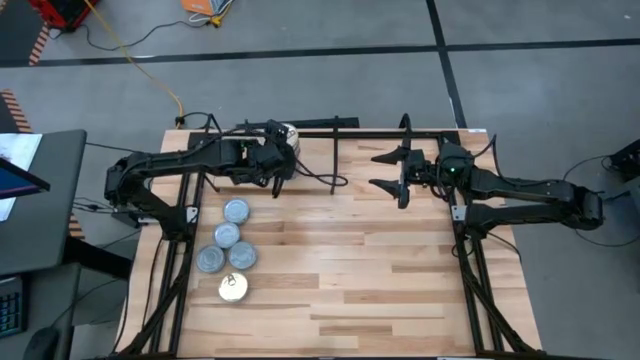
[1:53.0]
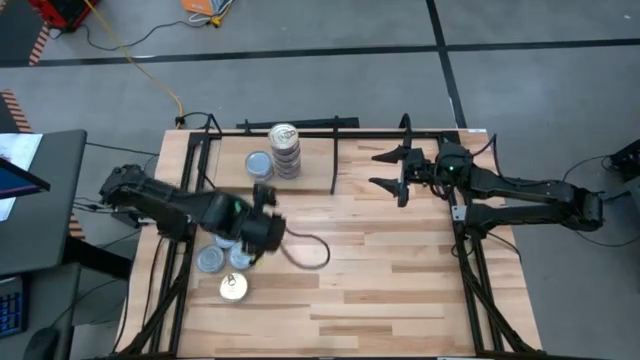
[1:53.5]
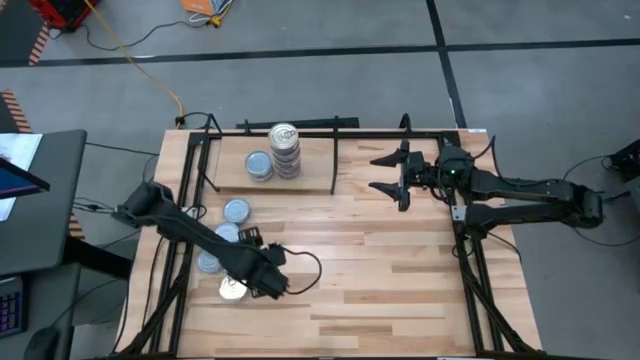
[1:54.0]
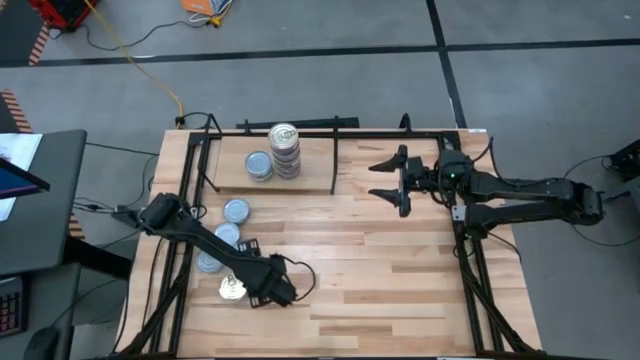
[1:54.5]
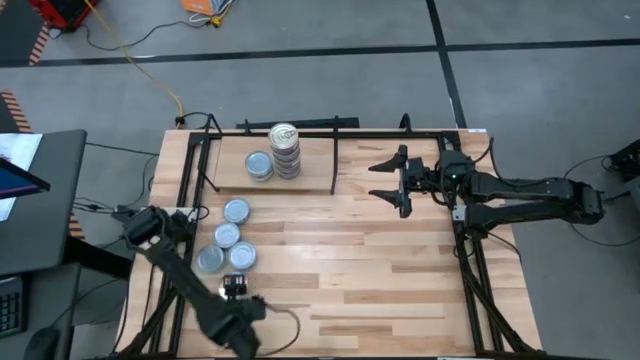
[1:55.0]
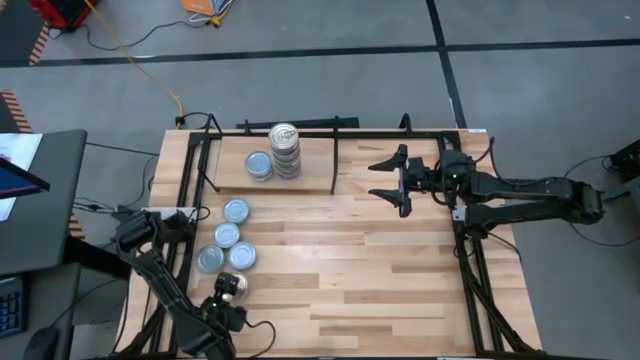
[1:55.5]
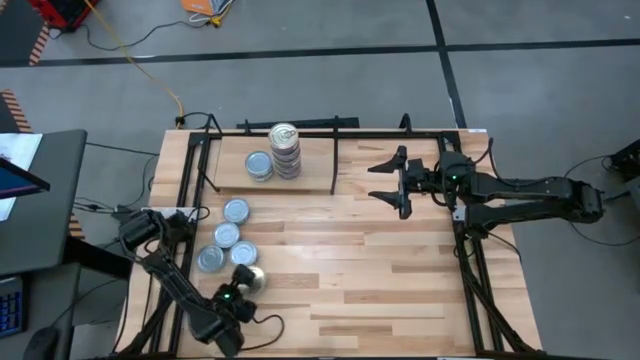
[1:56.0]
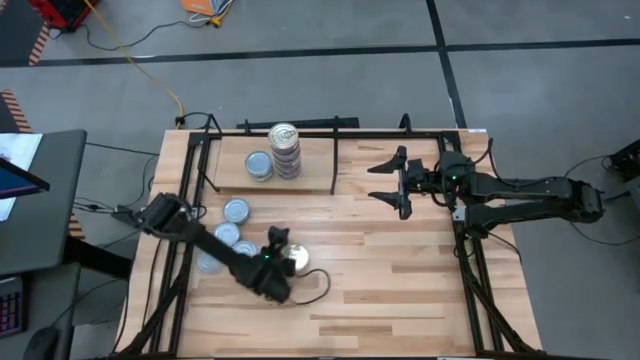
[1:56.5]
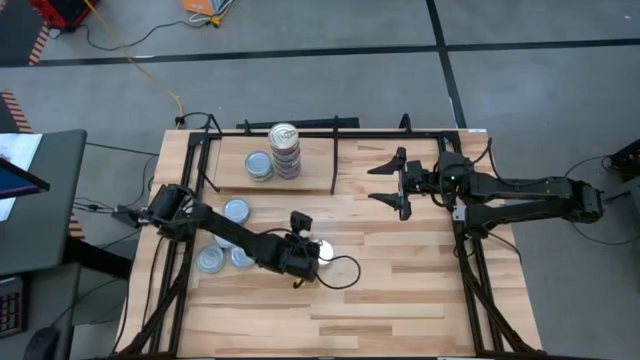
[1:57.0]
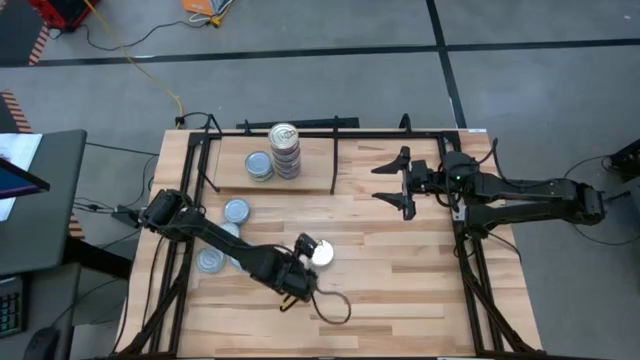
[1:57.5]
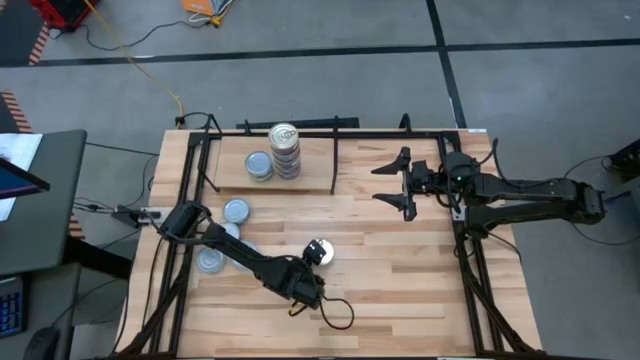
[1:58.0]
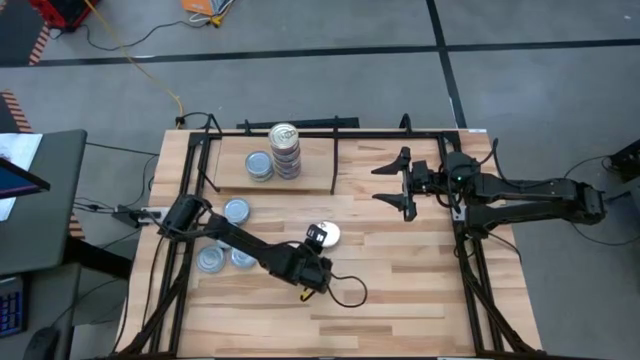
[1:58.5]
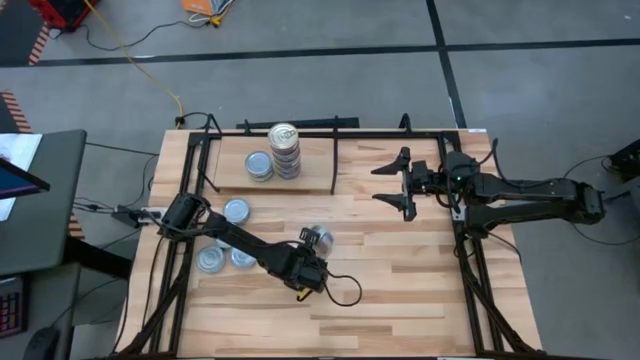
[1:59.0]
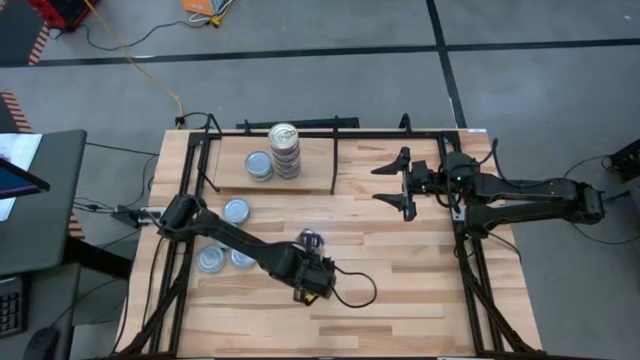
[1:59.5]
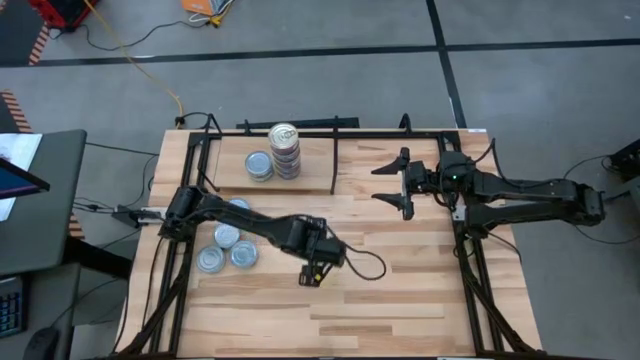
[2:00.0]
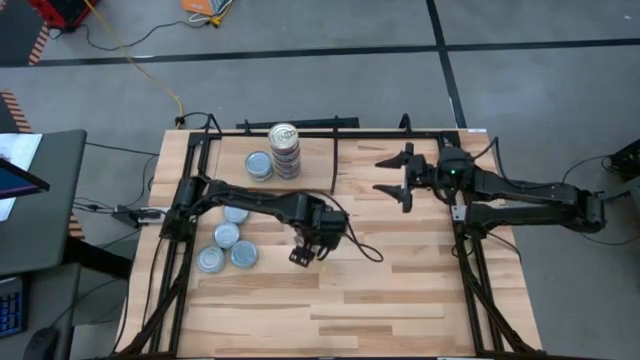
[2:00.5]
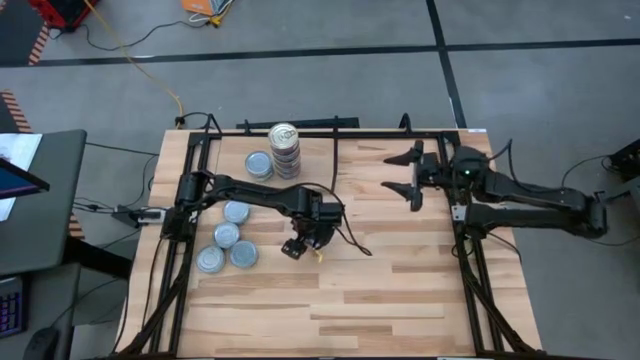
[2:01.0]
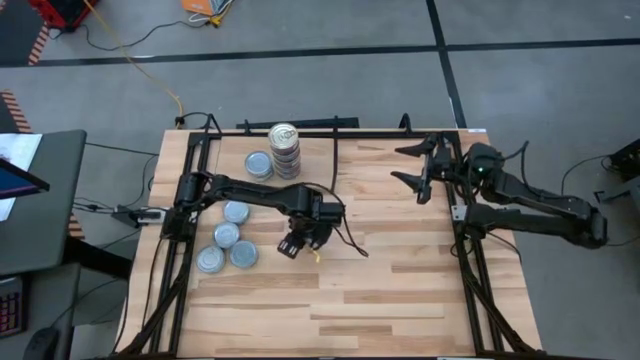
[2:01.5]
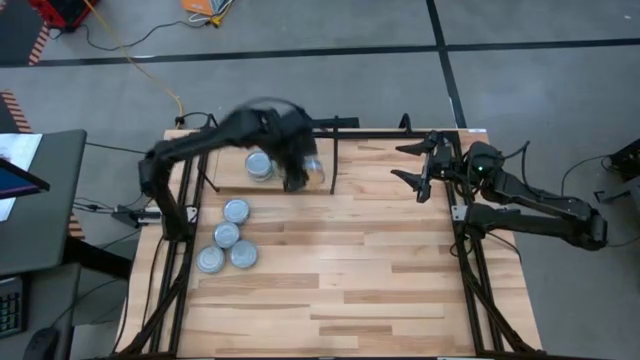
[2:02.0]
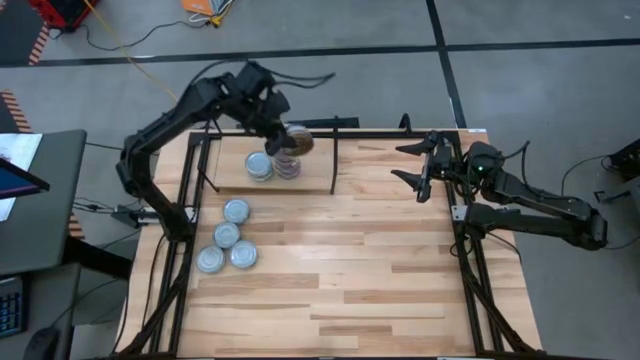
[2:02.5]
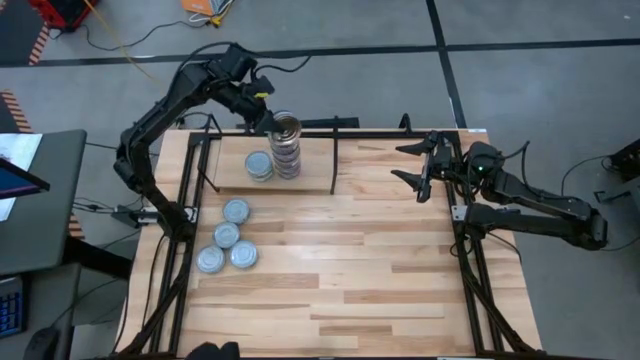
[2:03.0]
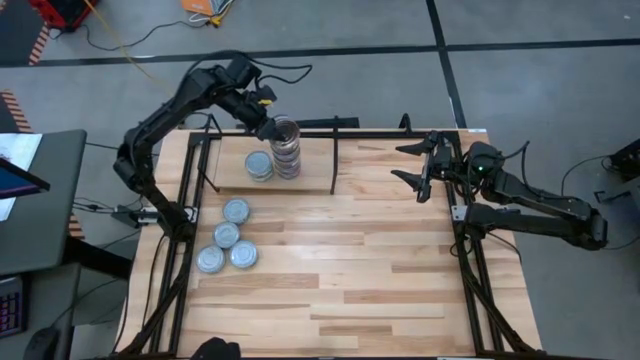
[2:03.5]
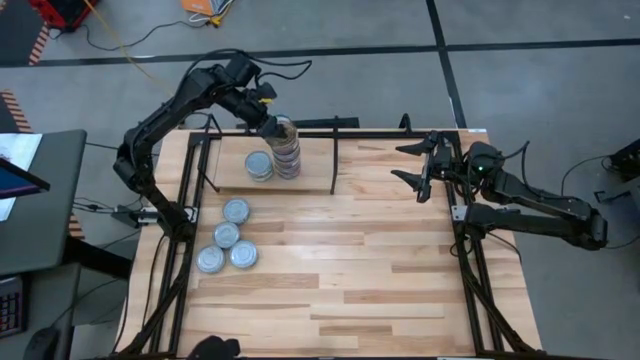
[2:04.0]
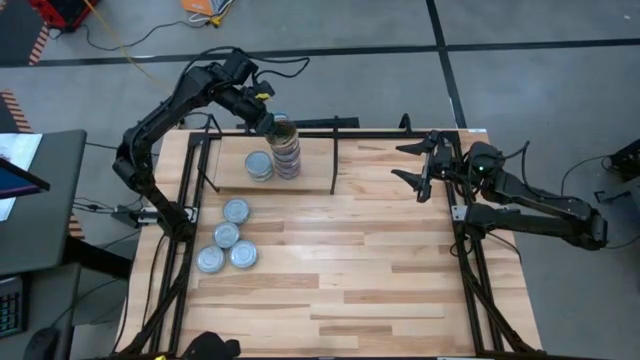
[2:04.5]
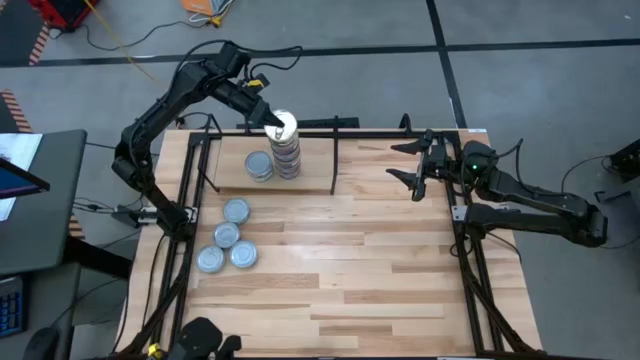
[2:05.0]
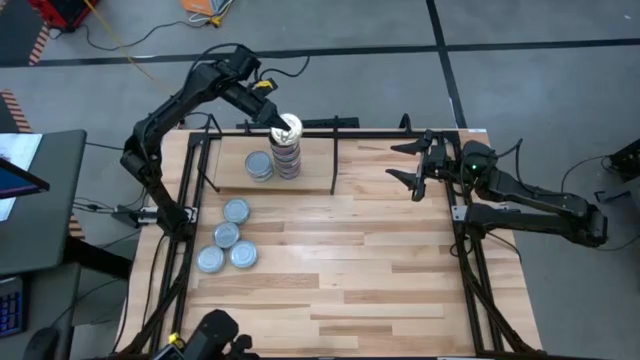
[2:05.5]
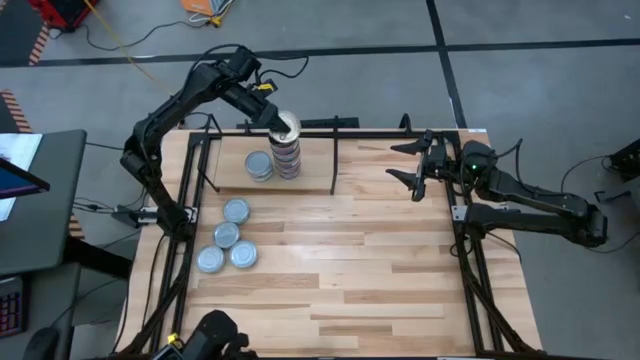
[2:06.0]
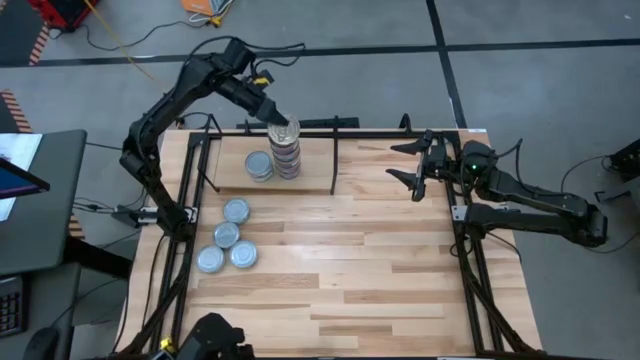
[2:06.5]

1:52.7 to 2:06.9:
Task: Stack canned seafood by type on shelf
Stack the blue pink tuna can on top of the blue pink tuna cans on the shelf

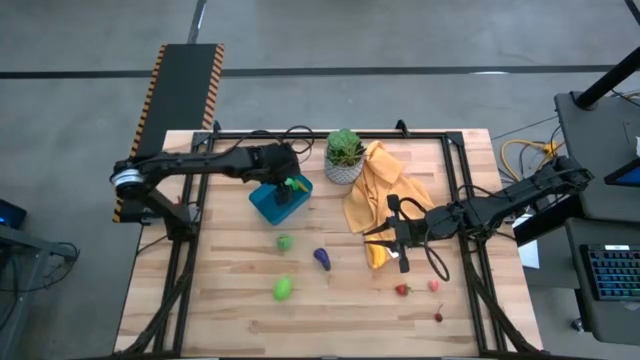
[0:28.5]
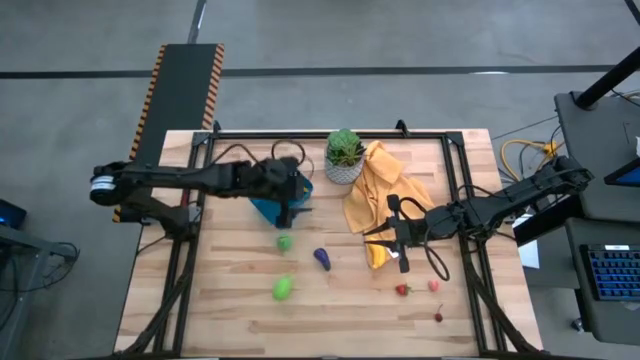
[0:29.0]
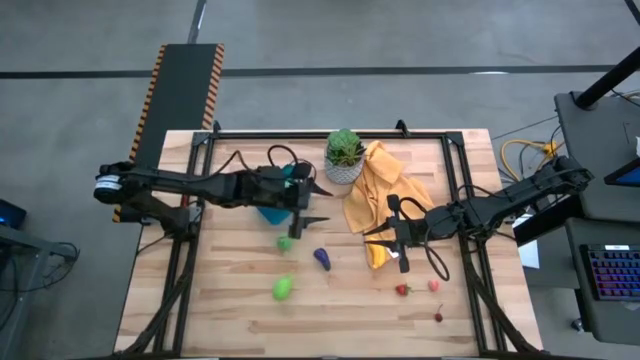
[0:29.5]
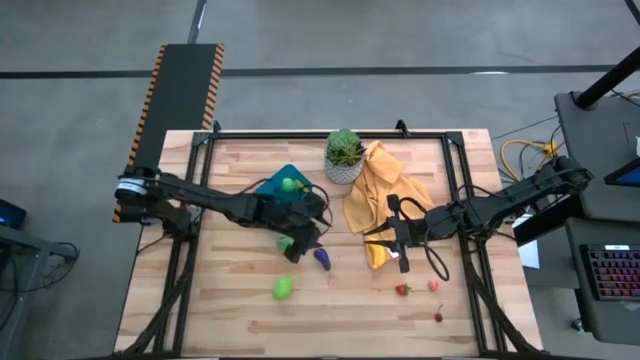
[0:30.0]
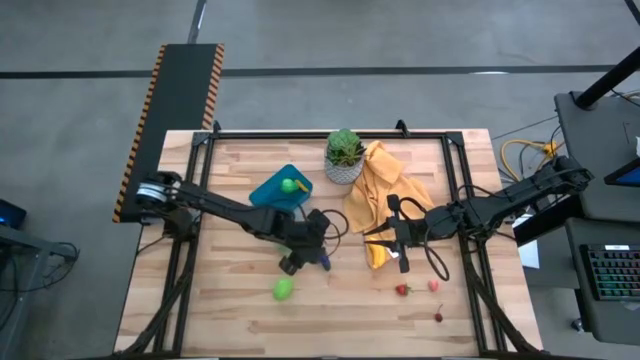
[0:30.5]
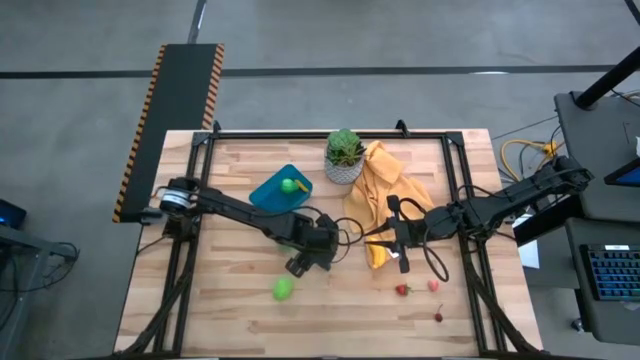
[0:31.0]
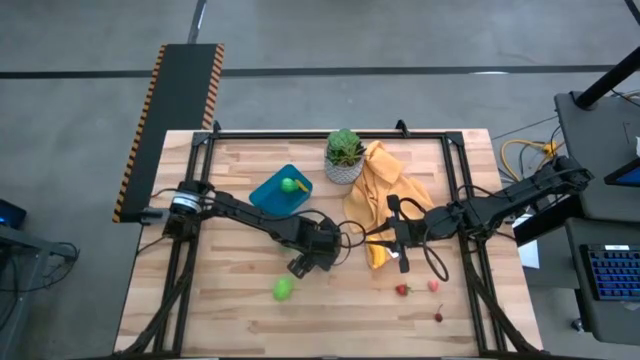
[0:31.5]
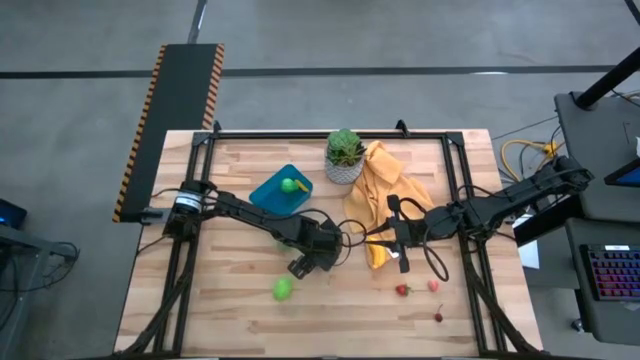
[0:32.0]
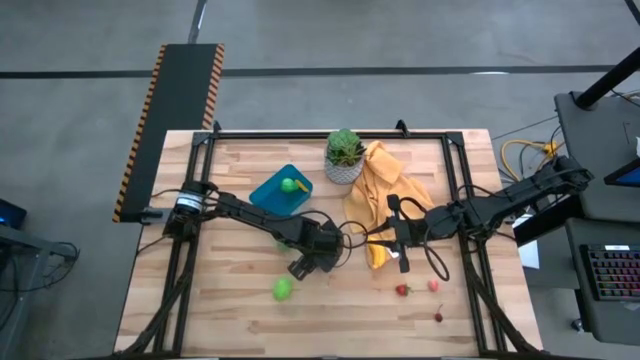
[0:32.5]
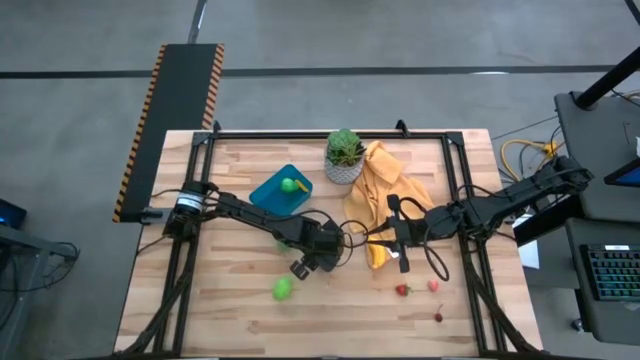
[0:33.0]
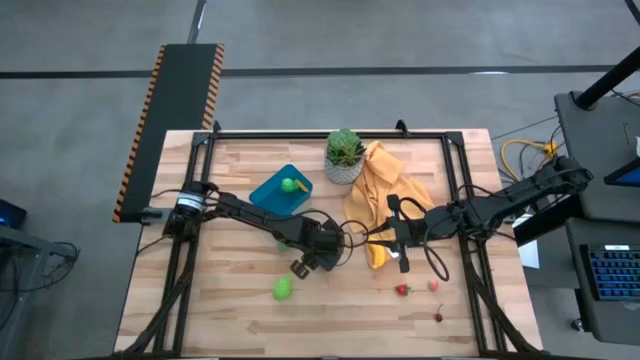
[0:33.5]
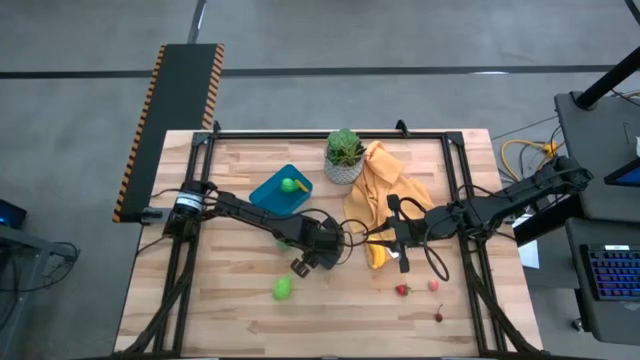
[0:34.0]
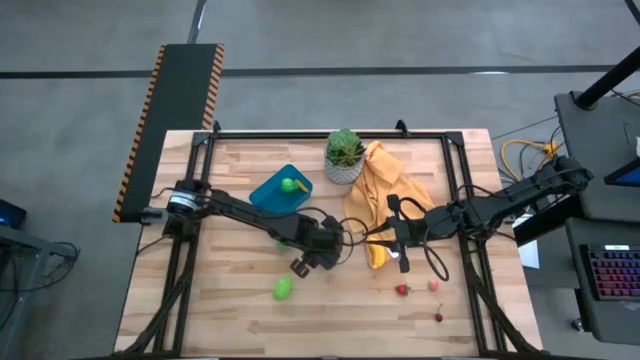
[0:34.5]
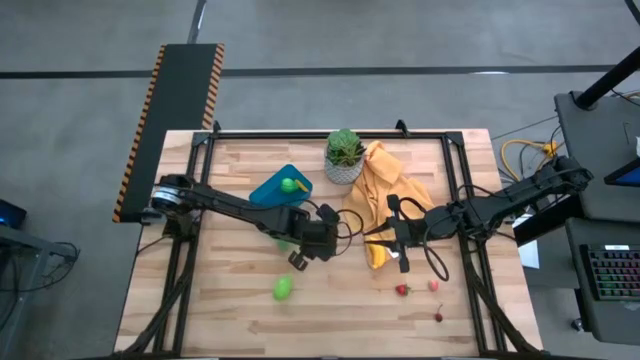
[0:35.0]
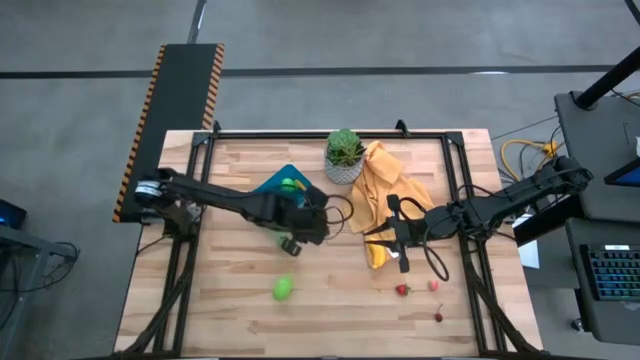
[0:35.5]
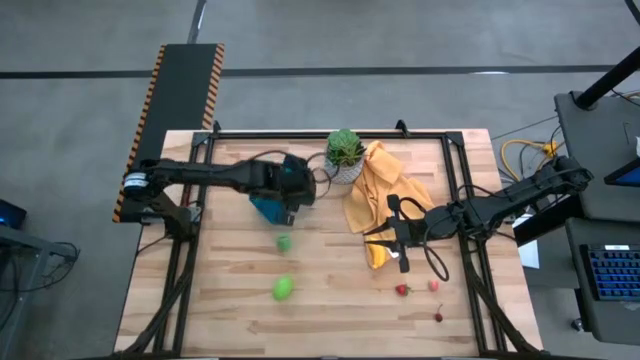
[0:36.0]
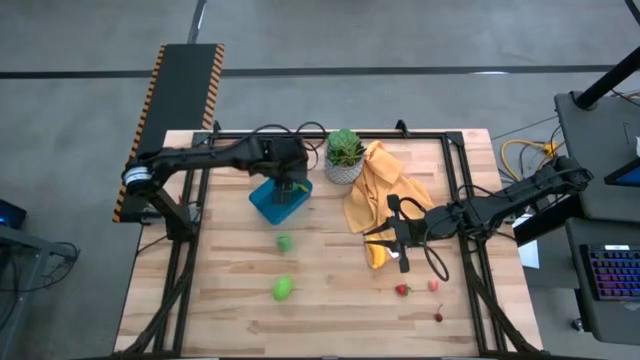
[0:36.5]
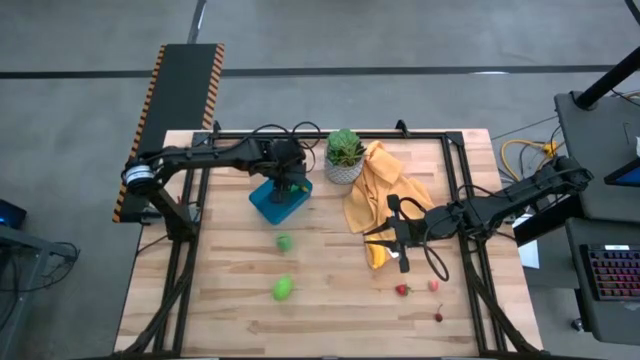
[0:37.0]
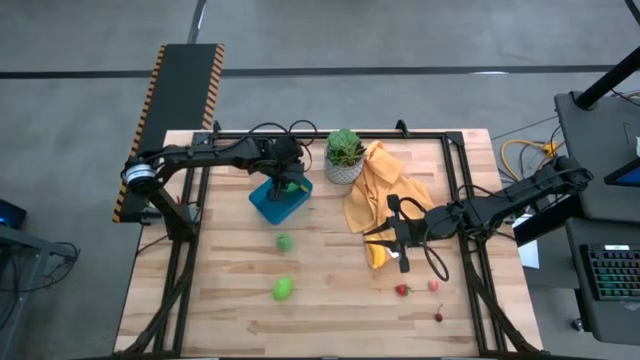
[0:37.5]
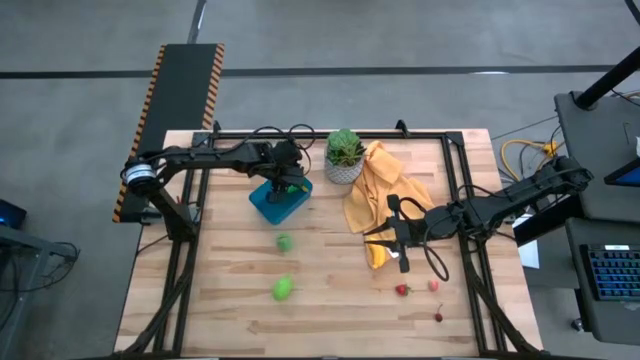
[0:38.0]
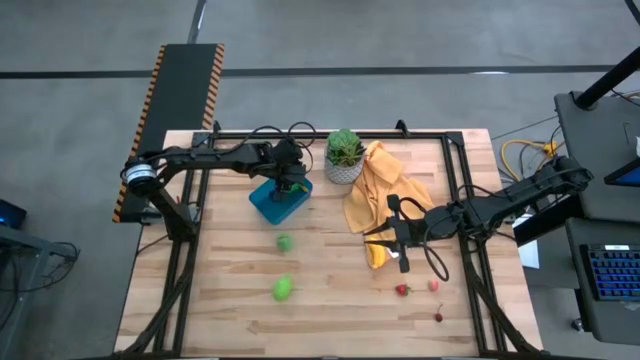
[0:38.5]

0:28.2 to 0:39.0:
Task: Pick and placing Produce into tupperware
Put the violet eggplant into the blue bin
